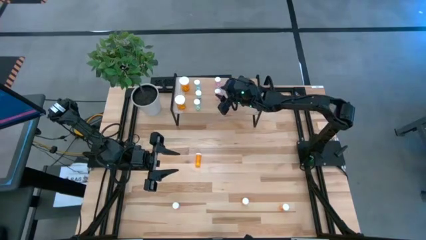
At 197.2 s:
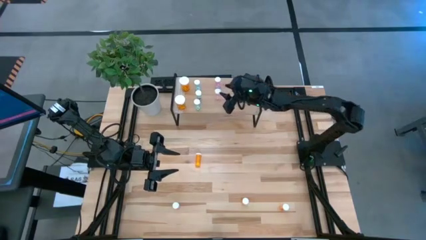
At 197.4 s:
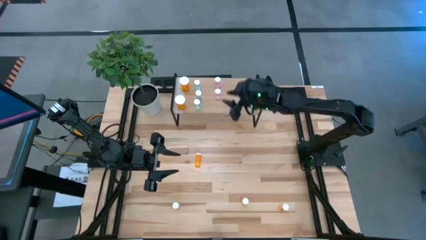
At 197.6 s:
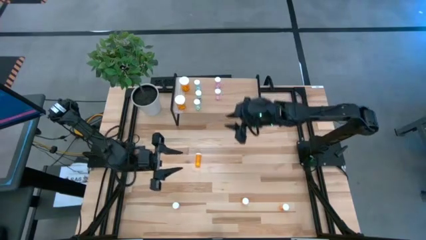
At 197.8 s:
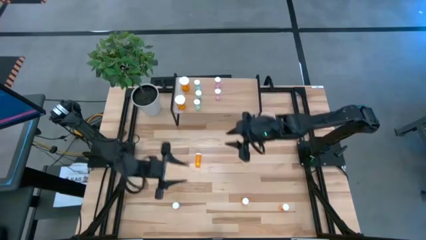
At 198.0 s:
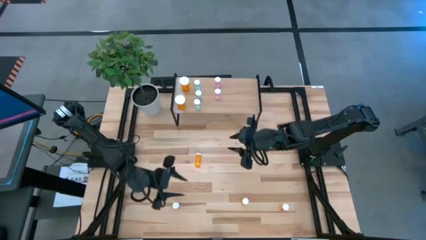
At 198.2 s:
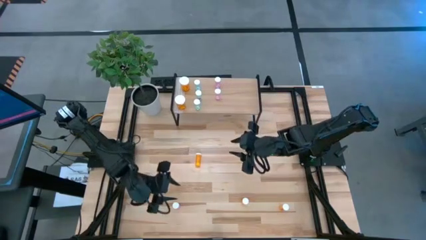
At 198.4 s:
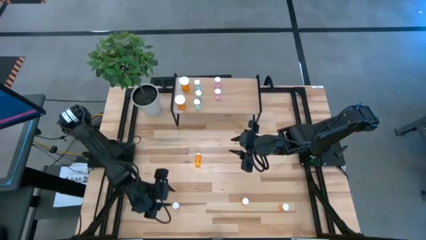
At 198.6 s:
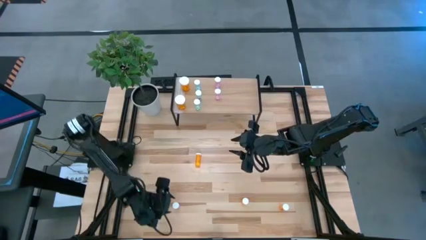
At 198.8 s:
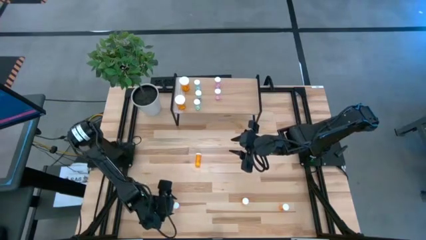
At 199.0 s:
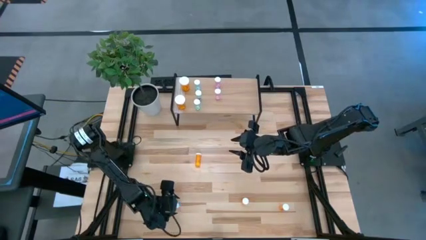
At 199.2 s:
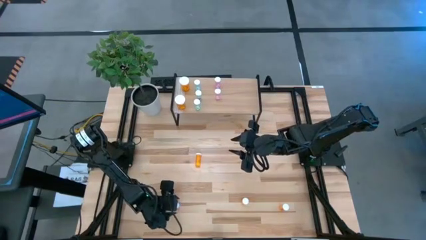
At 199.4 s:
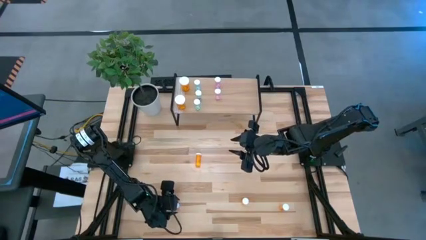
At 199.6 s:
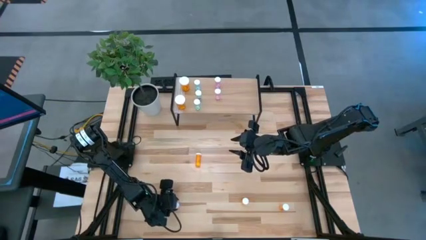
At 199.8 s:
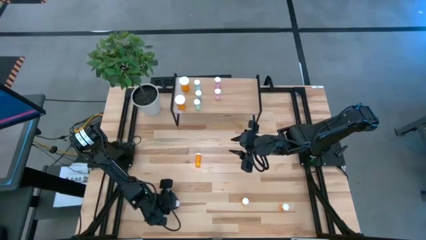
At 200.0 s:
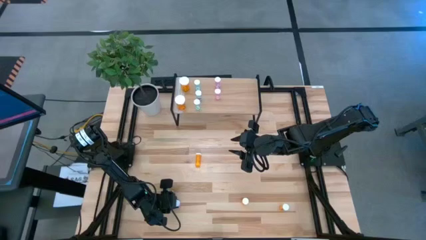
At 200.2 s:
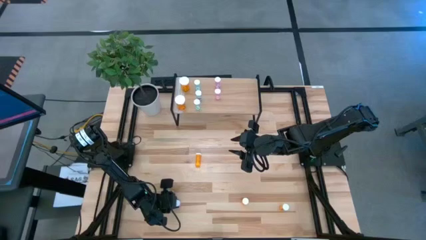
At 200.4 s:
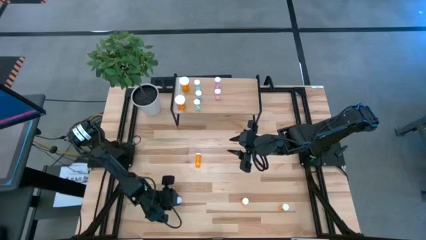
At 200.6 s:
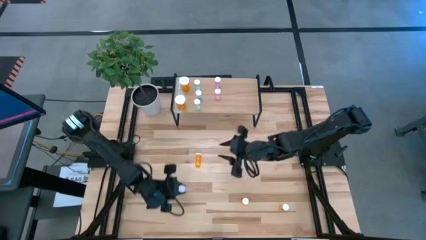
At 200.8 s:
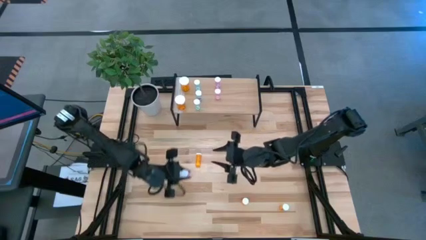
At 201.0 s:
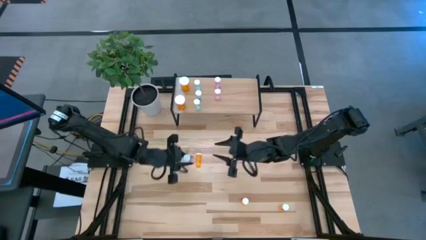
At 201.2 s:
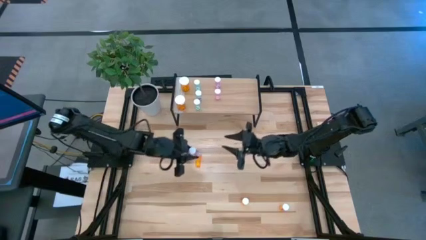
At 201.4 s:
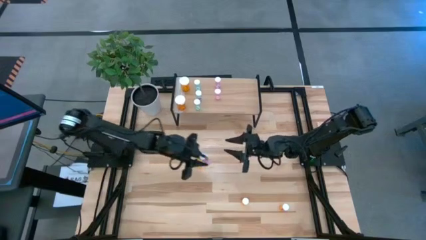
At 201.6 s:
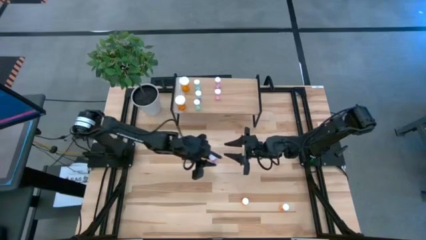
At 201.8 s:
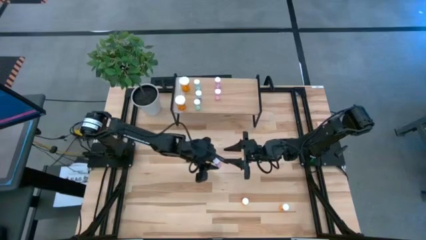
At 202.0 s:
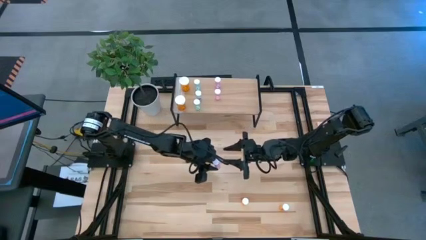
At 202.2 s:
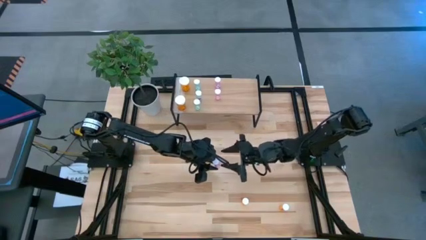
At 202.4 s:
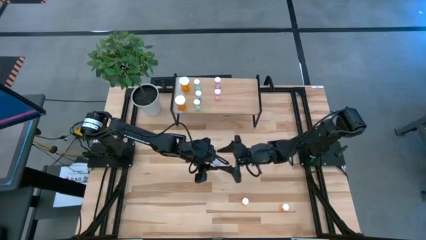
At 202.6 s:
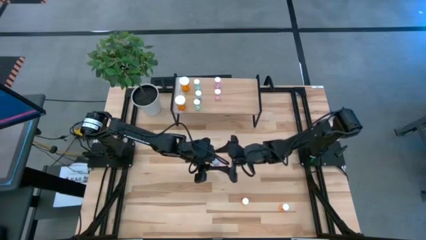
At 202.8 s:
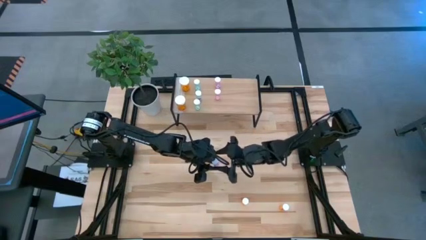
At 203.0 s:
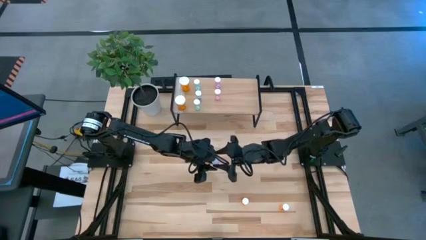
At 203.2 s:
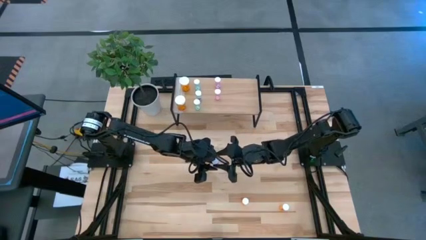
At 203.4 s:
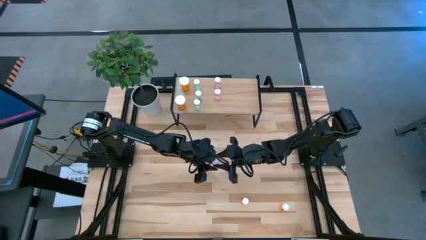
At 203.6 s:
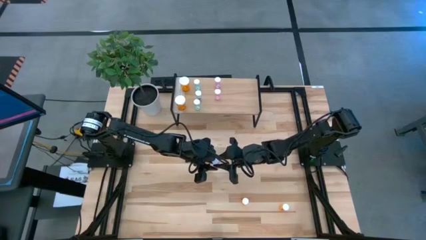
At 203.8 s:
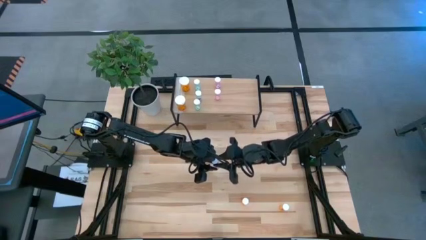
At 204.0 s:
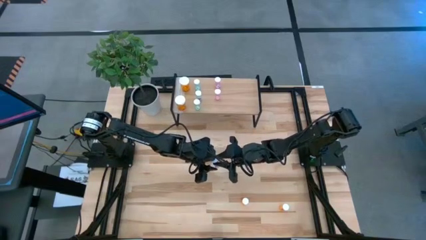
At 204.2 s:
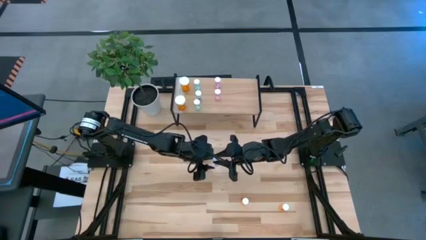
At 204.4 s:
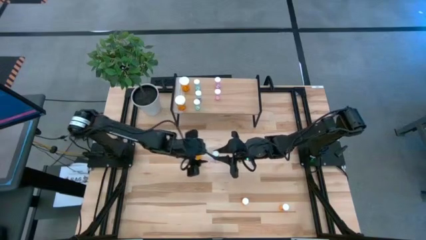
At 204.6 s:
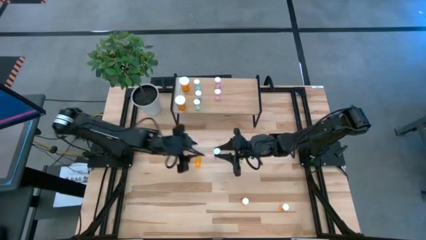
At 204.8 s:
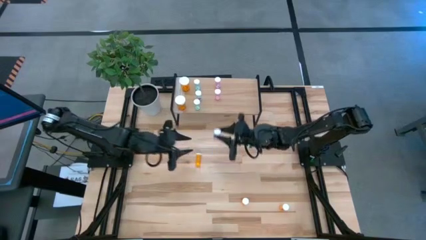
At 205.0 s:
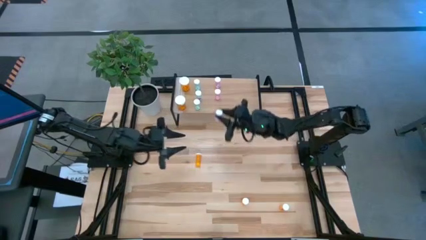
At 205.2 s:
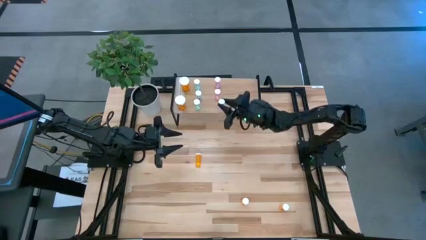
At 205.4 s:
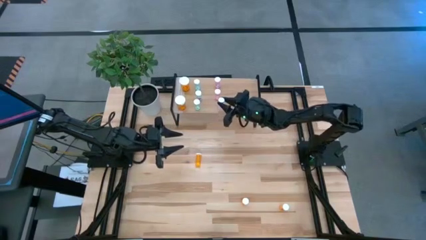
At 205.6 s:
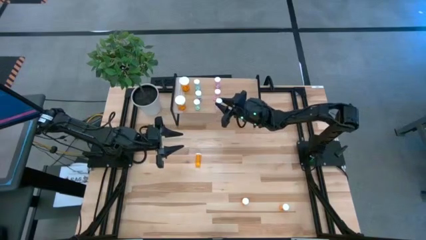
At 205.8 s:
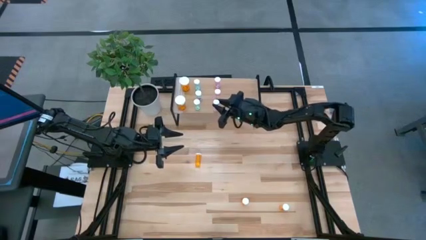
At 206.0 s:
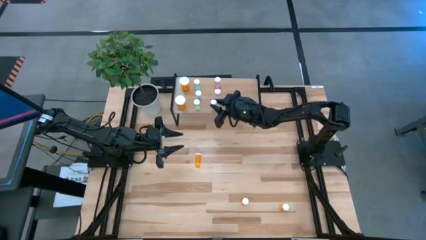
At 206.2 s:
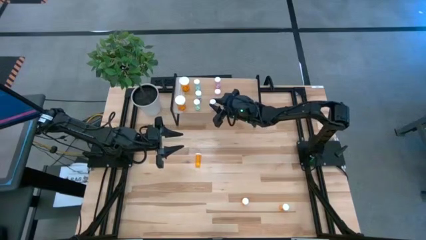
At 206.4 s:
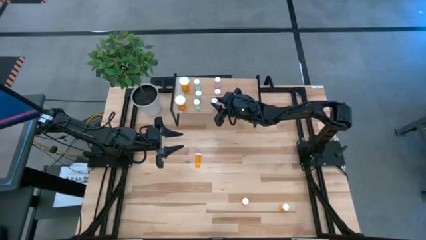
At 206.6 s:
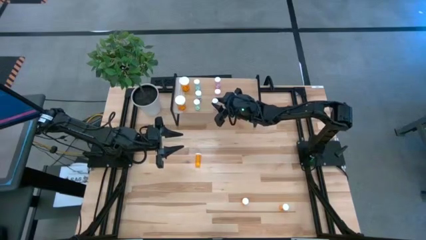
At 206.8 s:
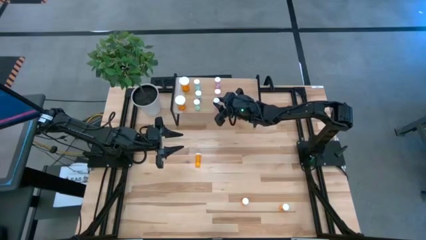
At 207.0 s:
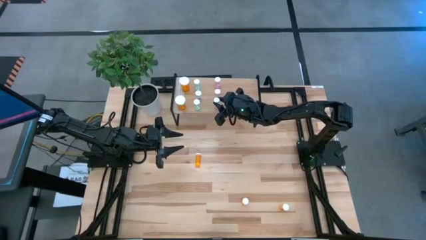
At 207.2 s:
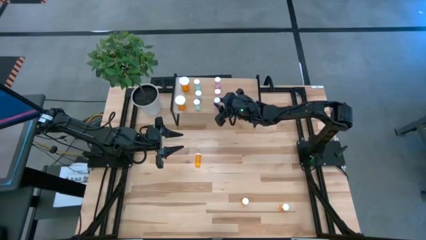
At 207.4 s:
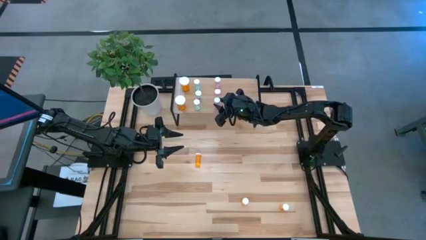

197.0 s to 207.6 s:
Task: Pick and place medicine bottles onto shelf by color
Put the pink pill bottle on the shelf aligned with the other pink pill bottles
